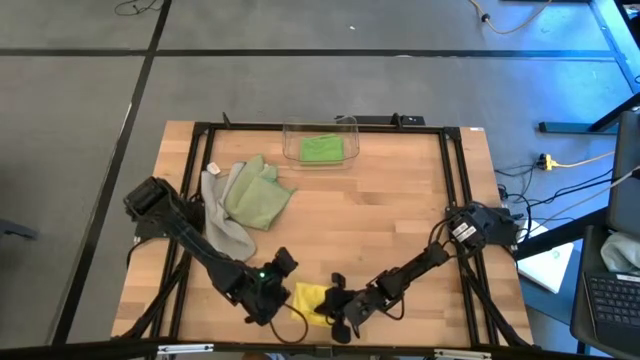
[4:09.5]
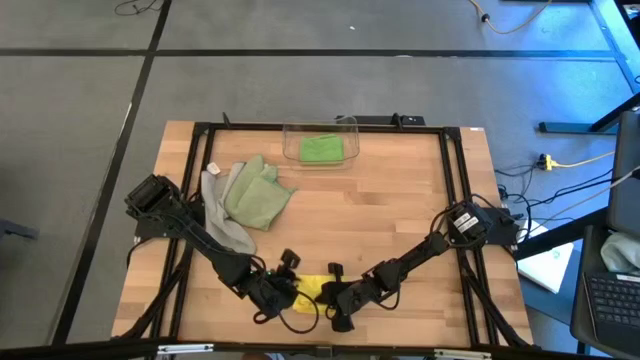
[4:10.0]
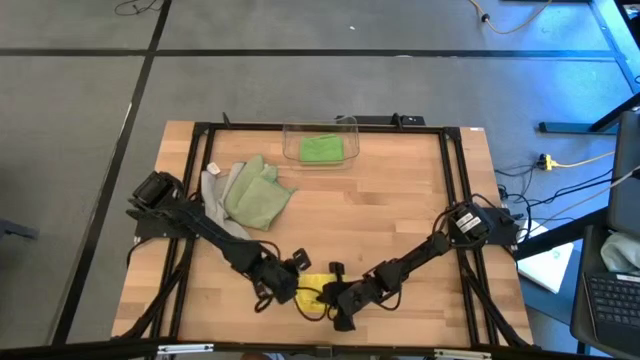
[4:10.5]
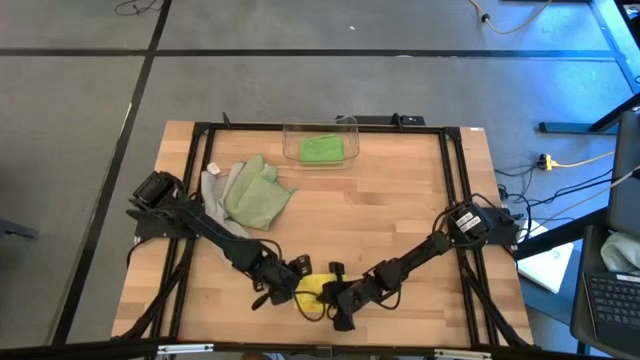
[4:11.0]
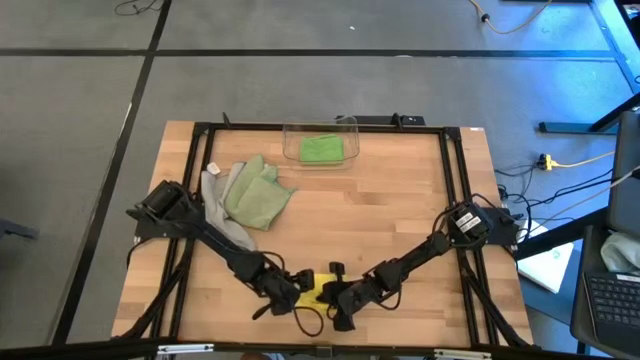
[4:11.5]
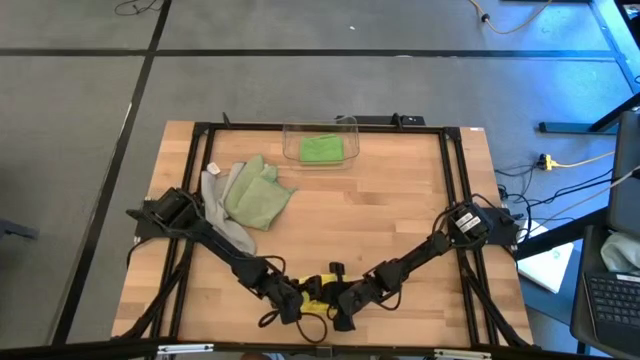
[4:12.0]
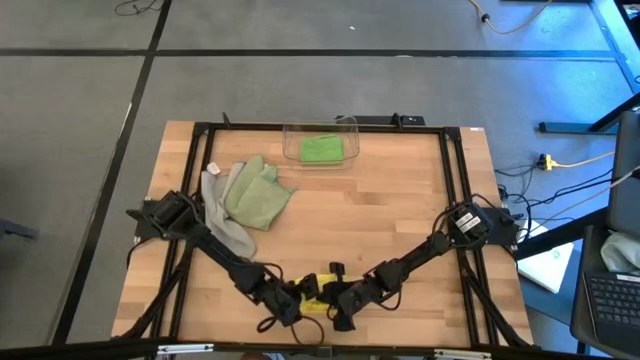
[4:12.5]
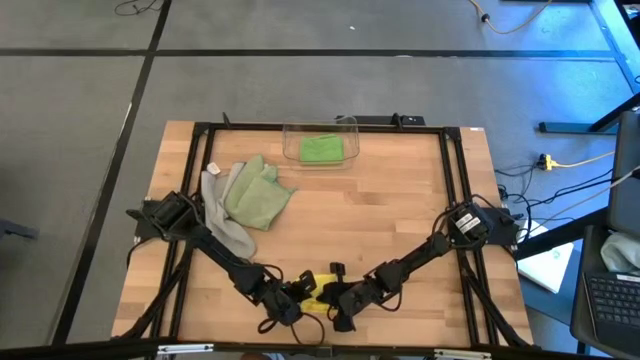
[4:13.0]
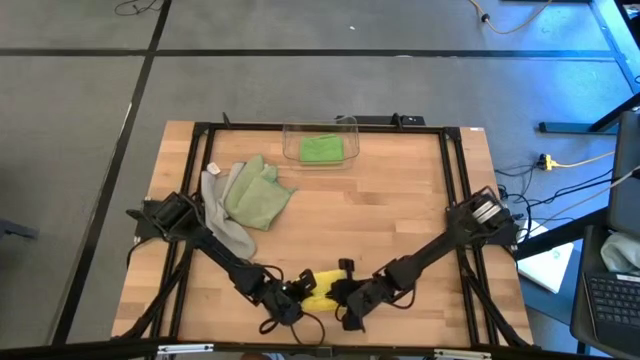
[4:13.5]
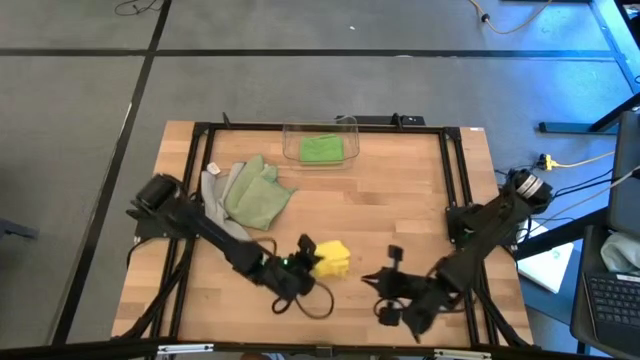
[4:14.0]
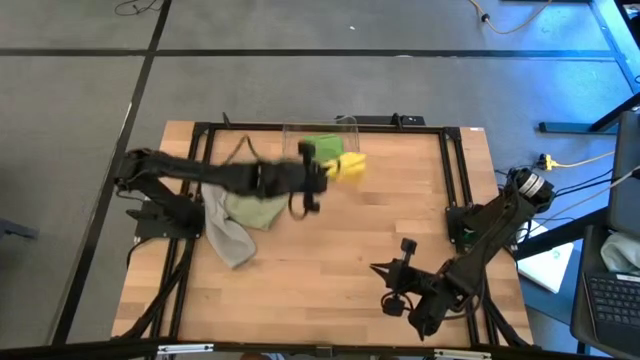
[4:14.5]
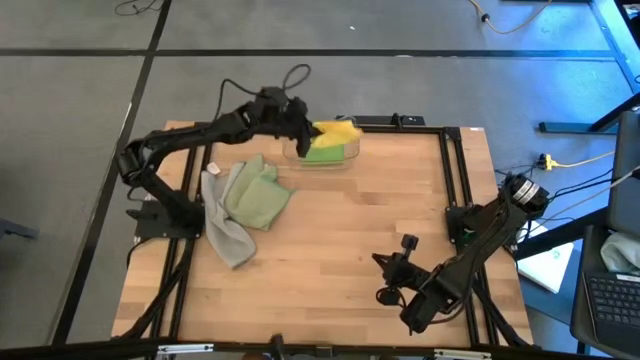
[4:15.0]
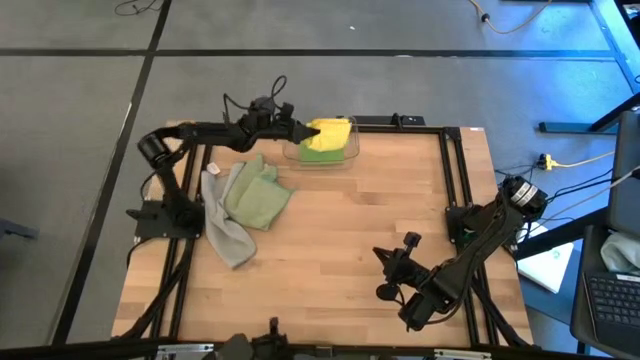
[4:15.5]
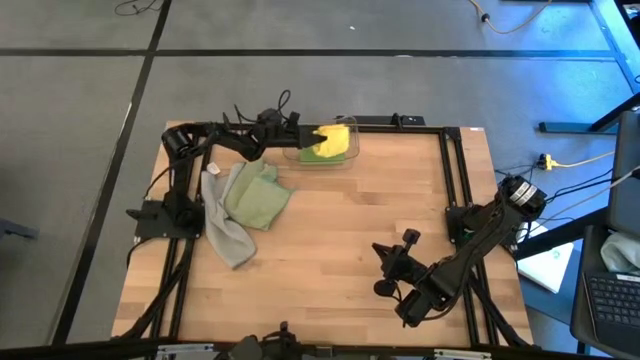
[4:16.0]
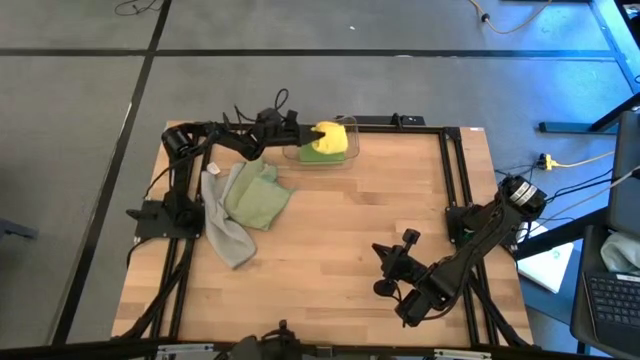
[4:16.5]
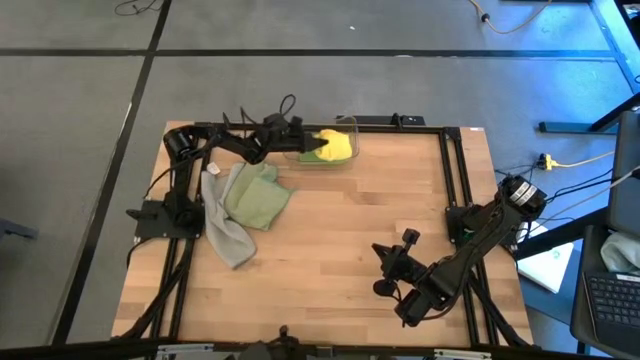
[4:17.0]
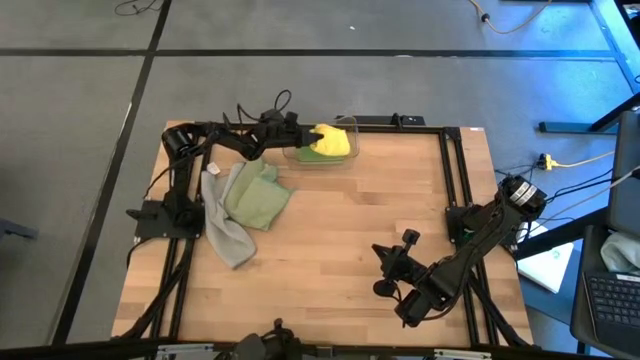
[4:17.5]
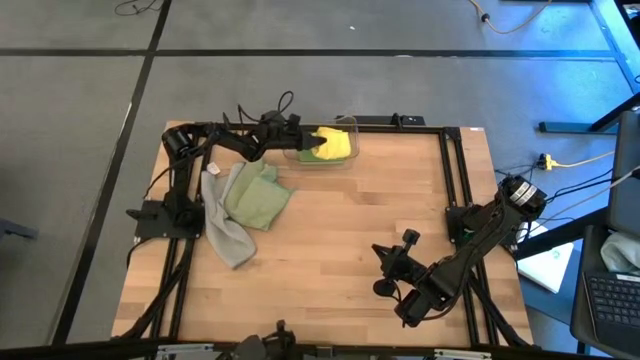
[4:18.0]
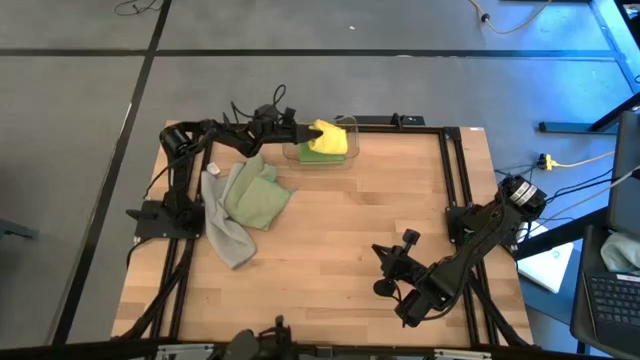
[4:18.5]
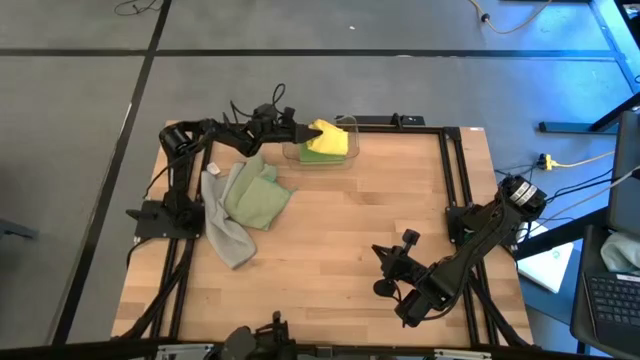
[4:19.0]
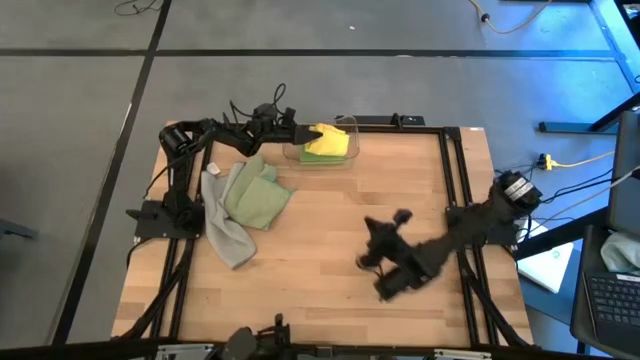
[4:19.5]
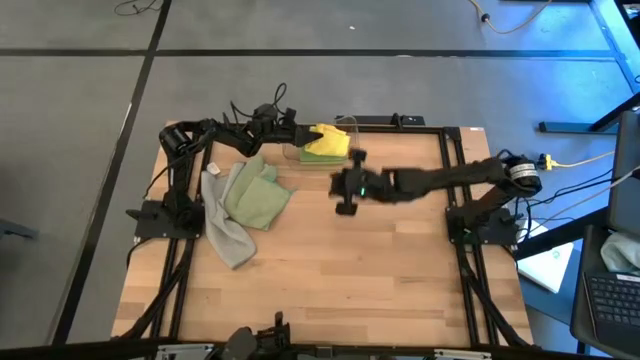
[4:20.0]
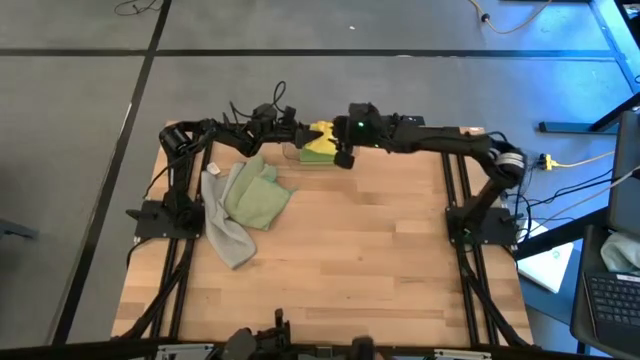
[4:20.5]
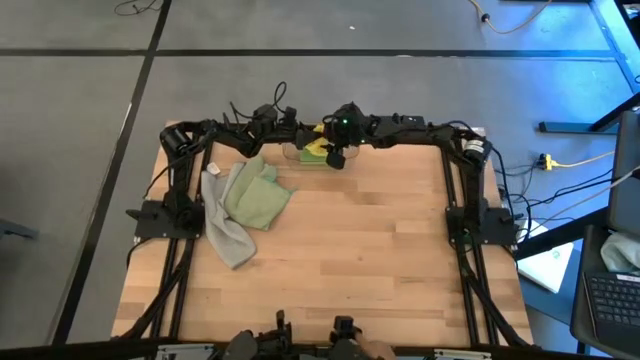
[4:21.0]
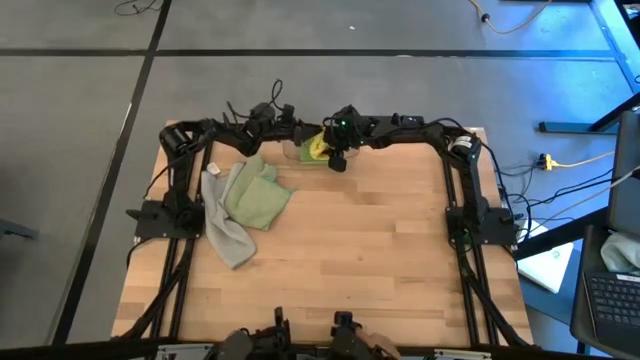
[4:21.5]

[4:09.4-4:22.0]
Task: Fold microfiber towels
Put the yellow microfiber cloth into the transparent bin

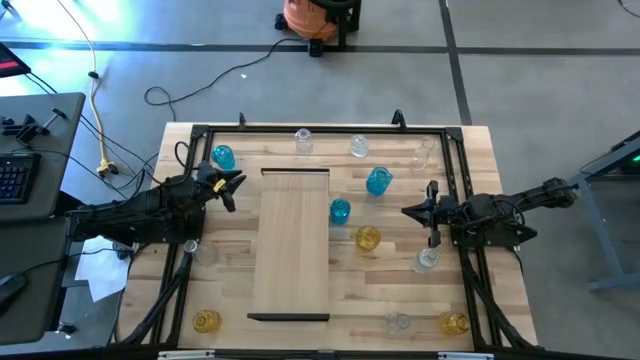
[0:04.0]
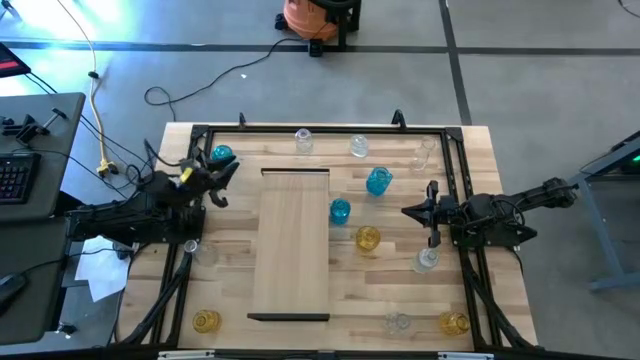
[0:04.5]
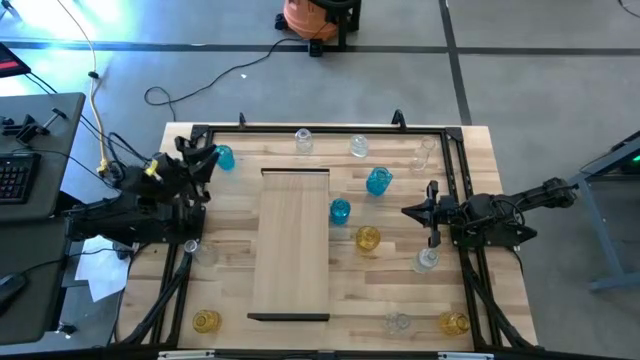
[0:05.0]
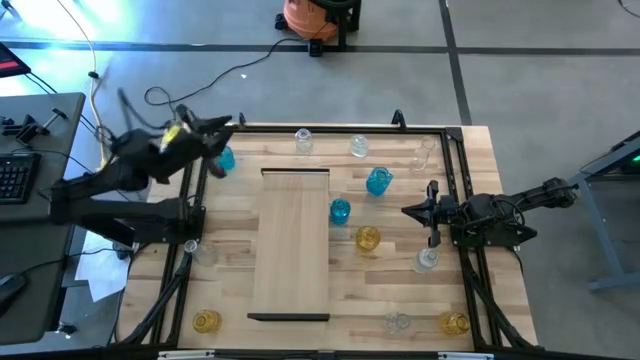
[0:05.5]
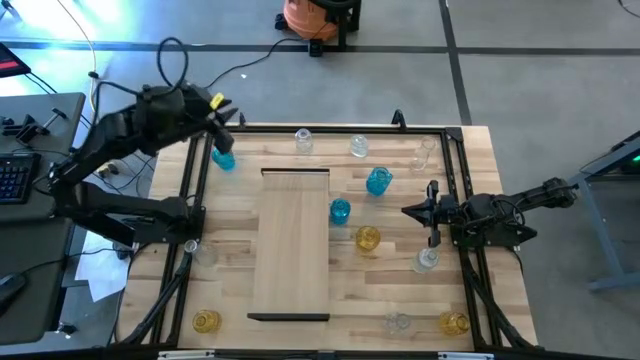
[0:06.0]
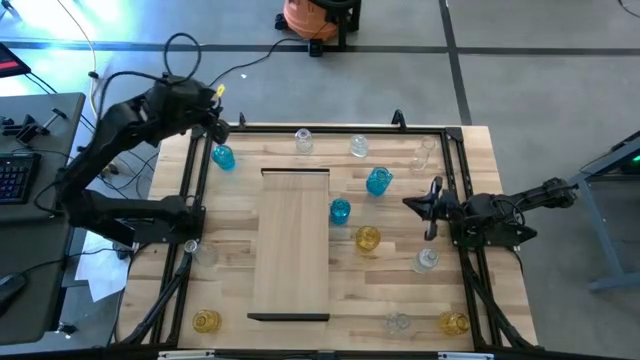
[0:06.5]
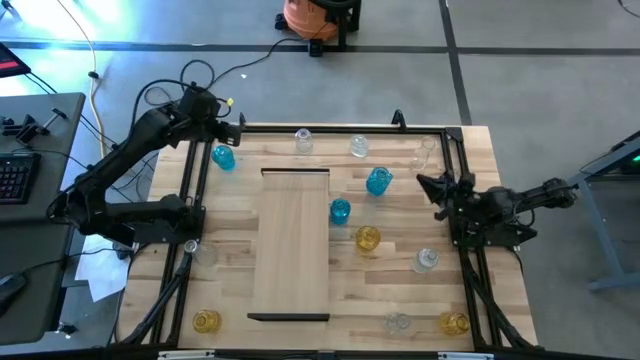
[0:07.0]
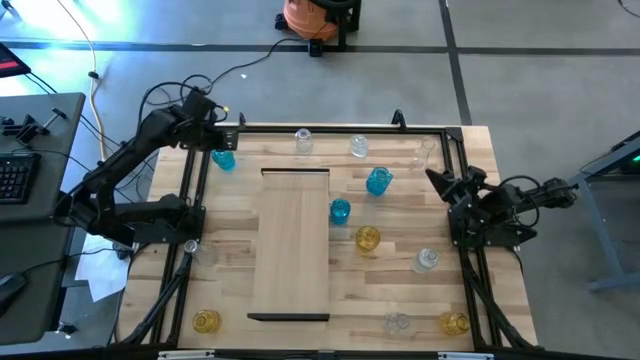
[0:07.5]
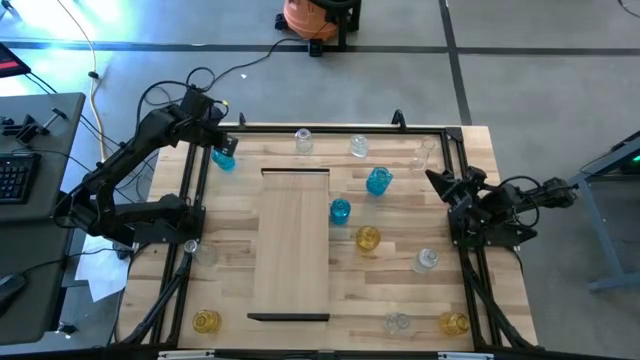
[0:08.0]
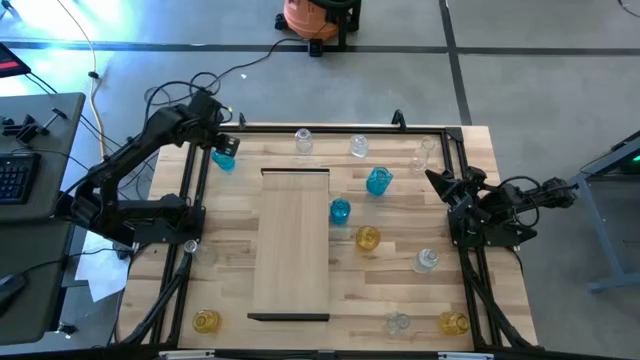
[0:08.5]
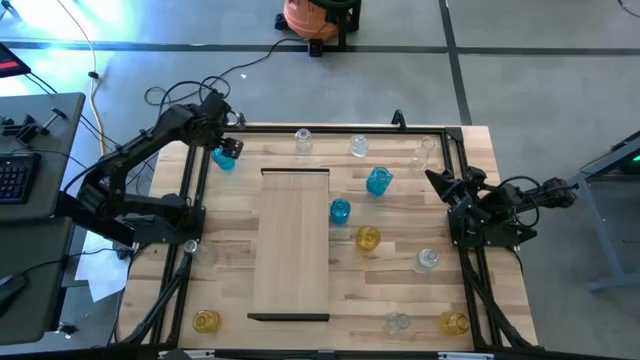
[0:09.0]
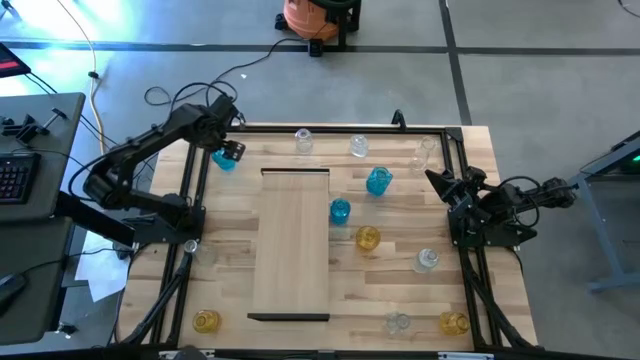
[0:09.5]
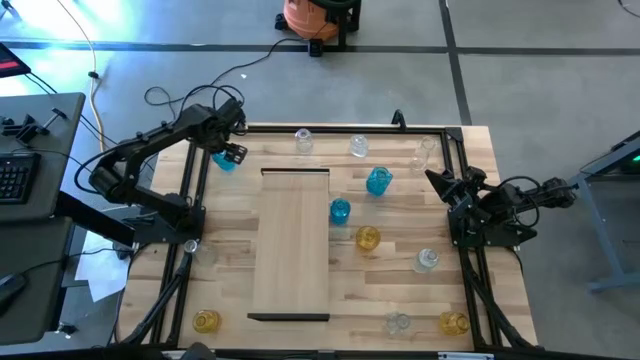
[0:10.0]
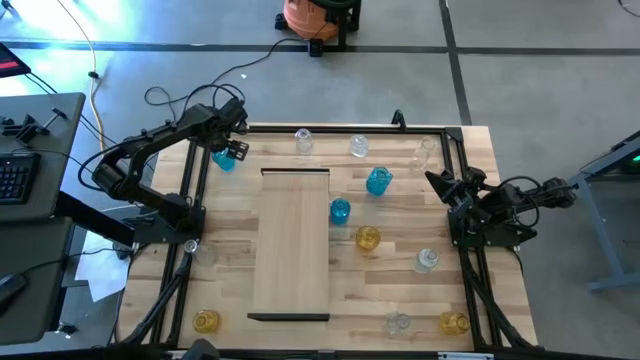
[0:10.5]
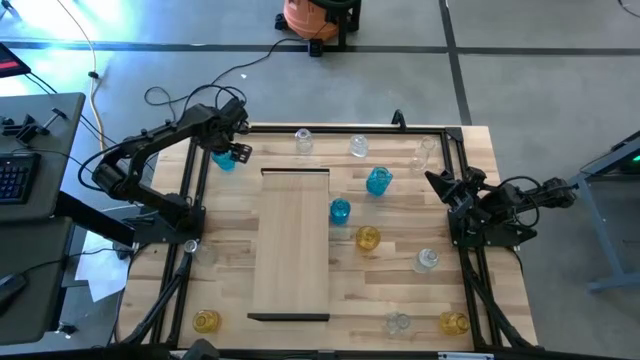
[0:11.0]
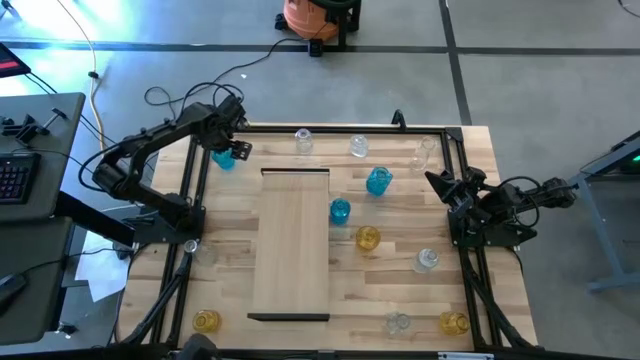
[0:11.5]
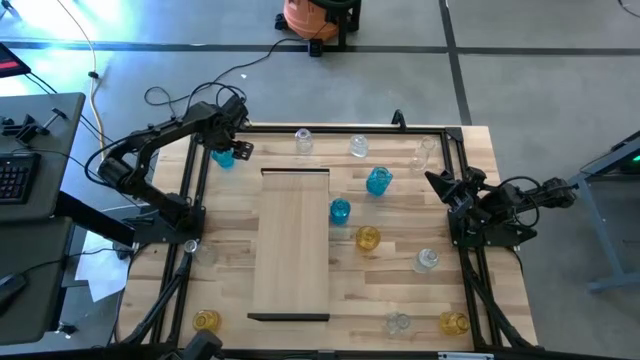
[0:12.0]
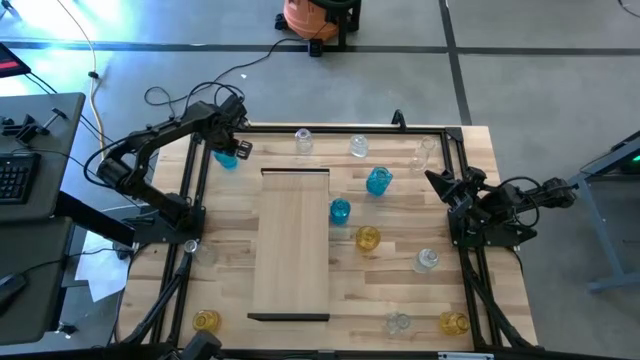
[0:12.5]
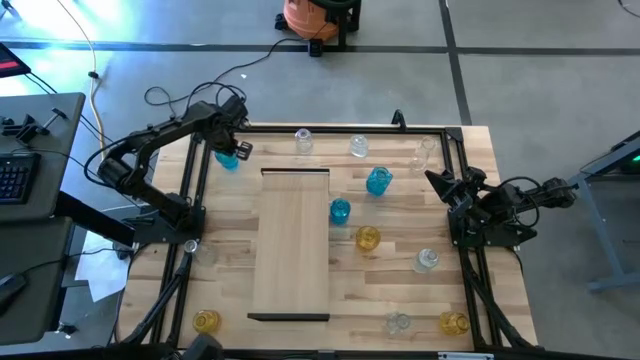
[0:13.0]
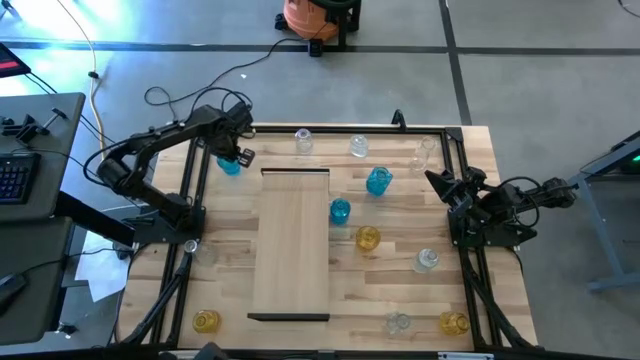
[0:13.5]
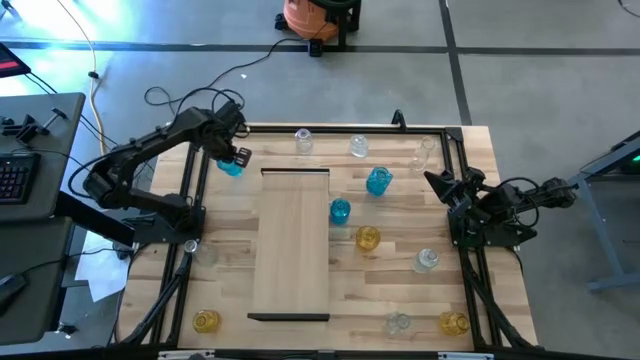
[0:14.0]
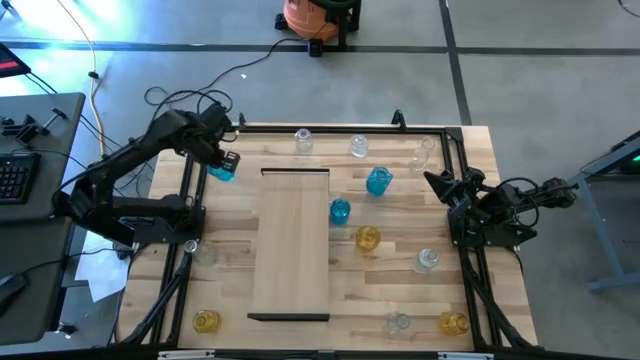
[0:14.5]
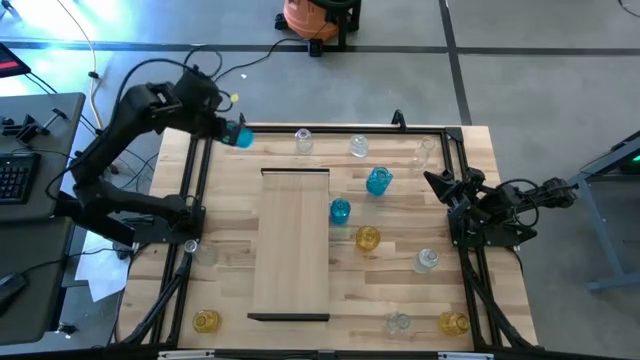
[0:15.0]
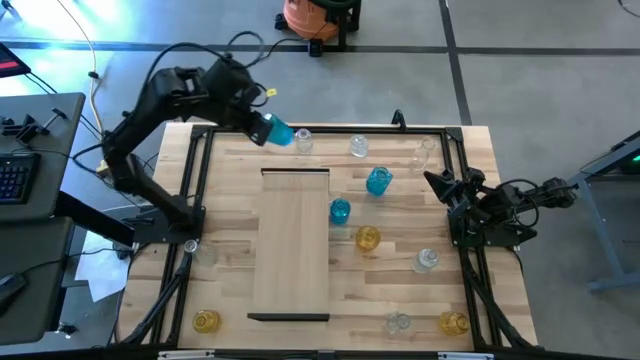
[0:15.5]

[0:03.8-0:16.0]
Task: sort vases onto shelf
Put the left blue vase on the shelf
